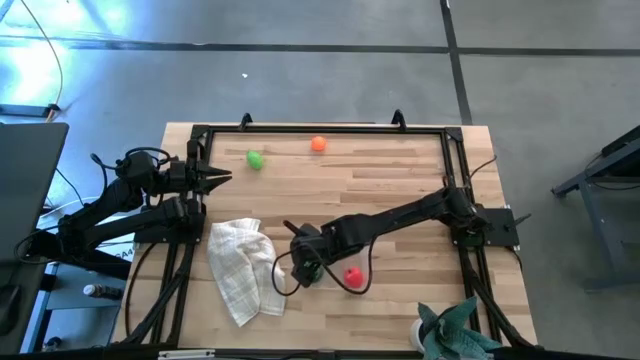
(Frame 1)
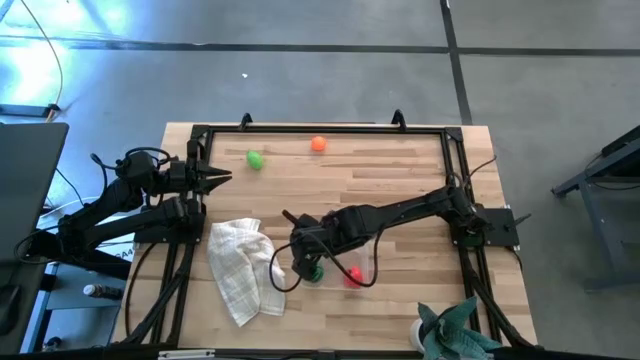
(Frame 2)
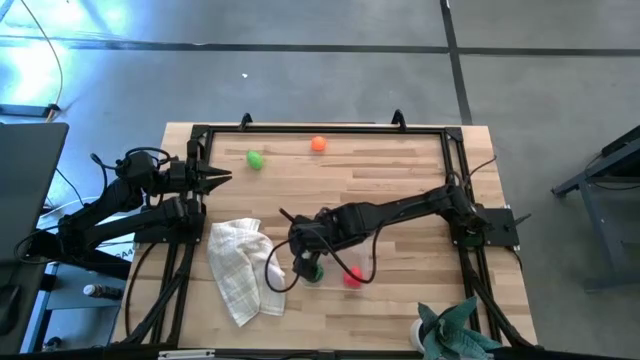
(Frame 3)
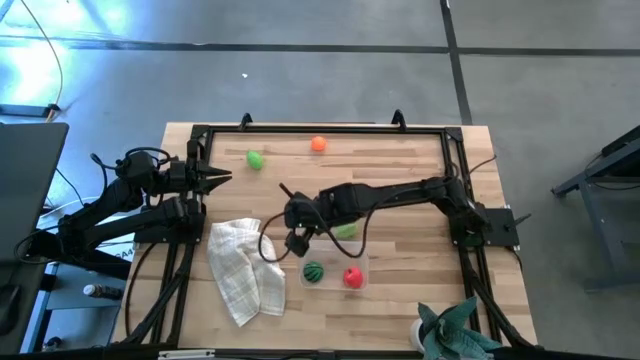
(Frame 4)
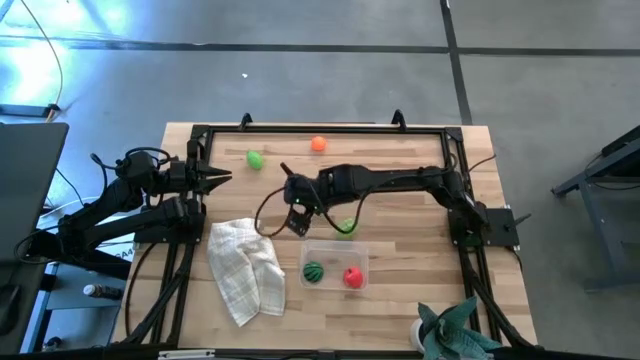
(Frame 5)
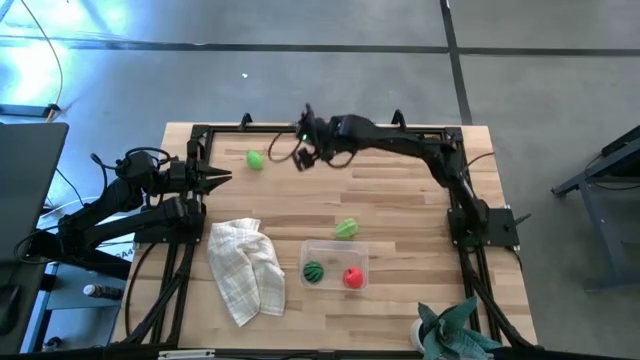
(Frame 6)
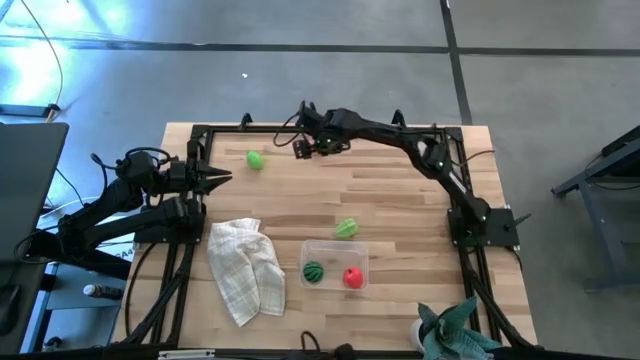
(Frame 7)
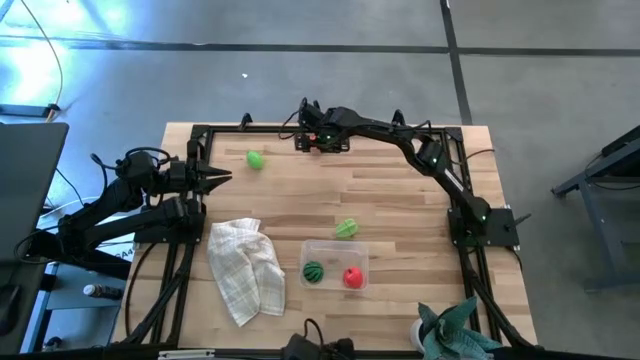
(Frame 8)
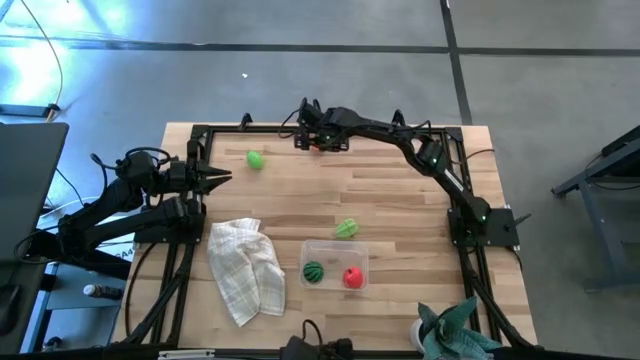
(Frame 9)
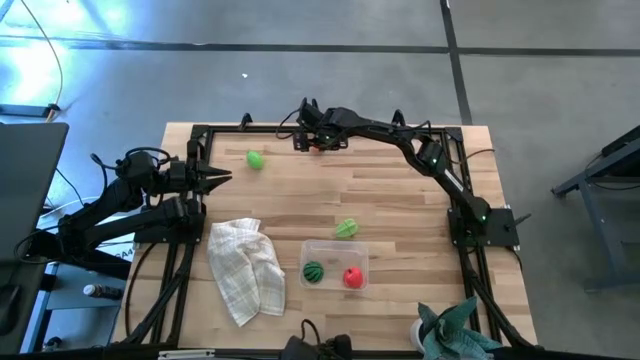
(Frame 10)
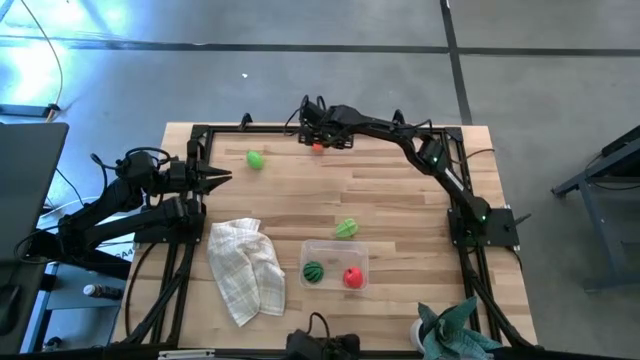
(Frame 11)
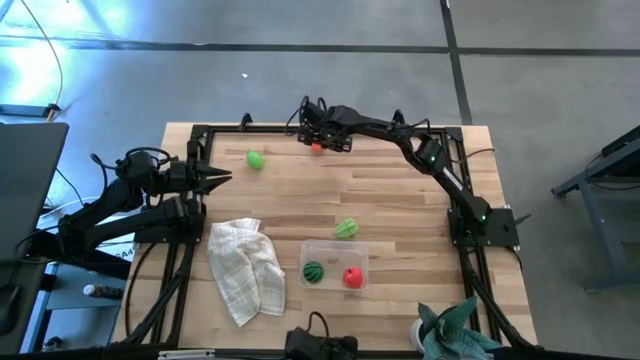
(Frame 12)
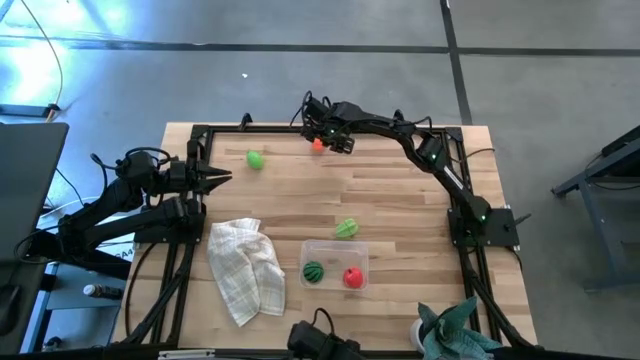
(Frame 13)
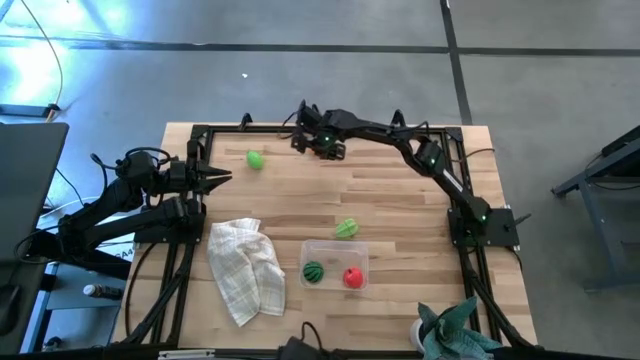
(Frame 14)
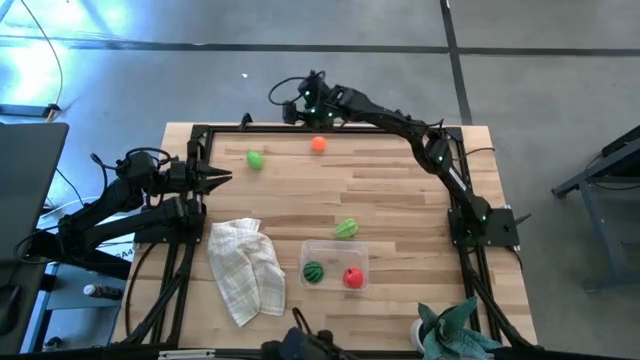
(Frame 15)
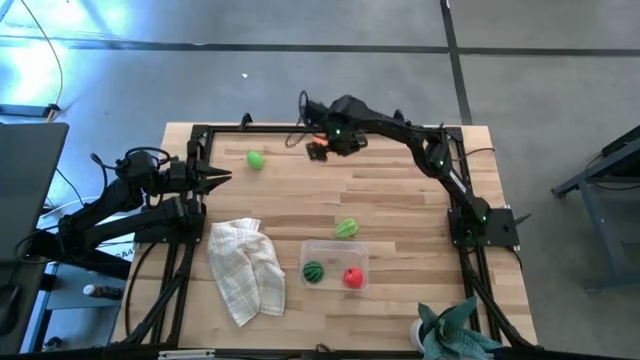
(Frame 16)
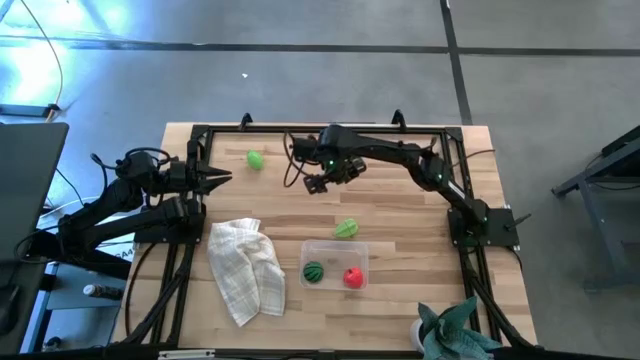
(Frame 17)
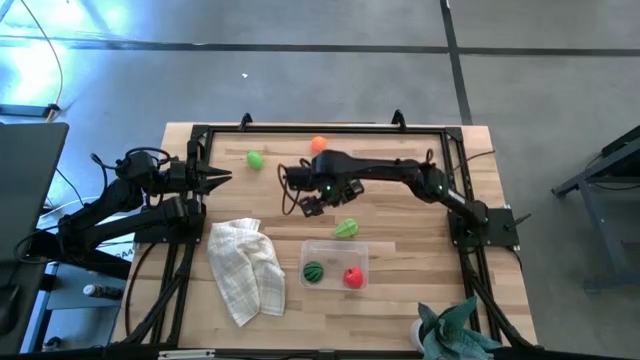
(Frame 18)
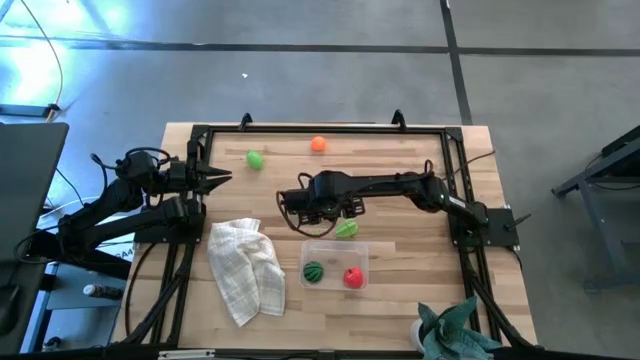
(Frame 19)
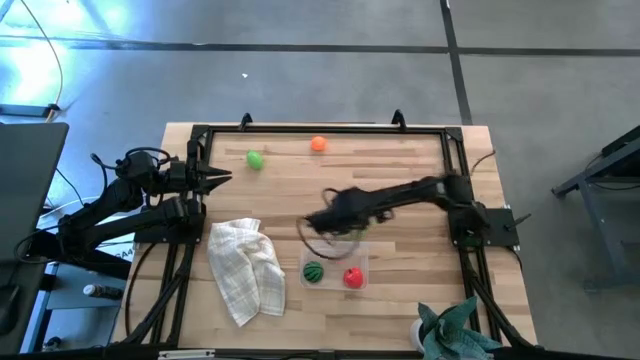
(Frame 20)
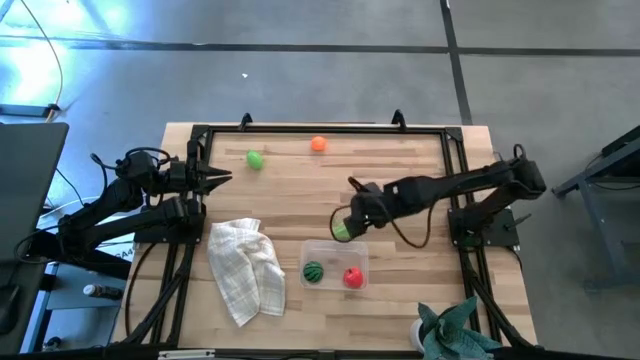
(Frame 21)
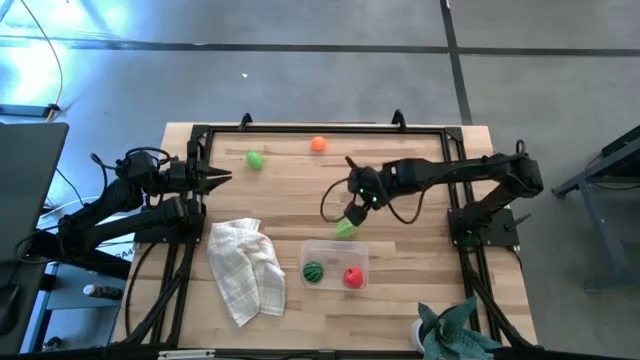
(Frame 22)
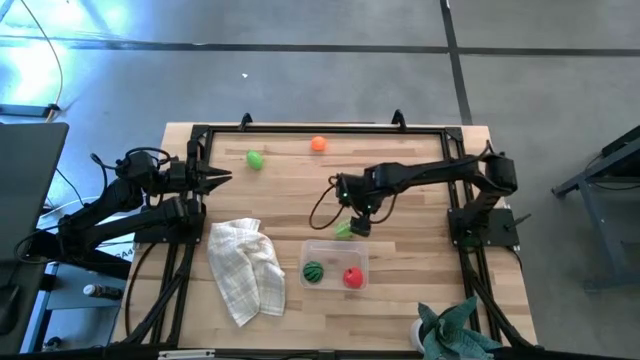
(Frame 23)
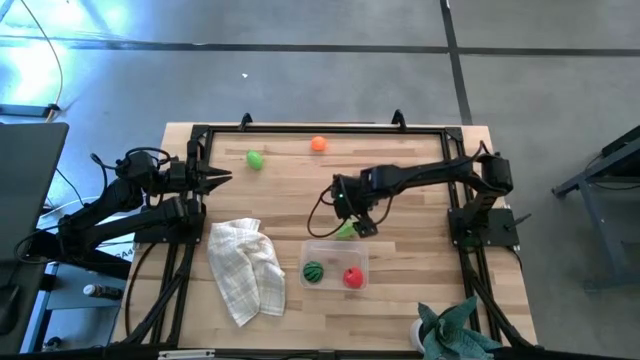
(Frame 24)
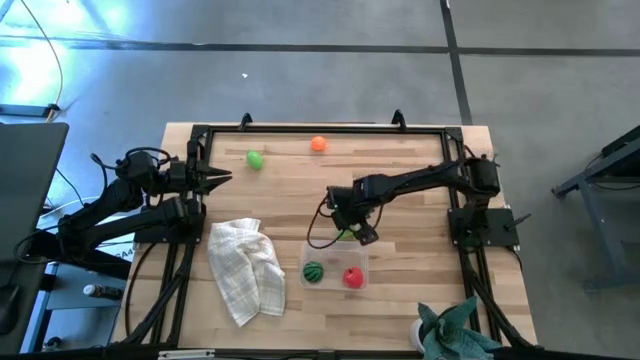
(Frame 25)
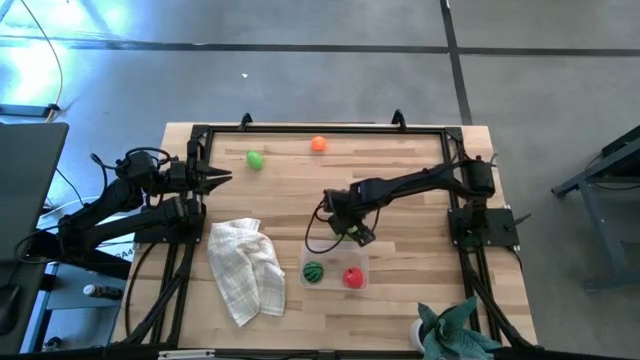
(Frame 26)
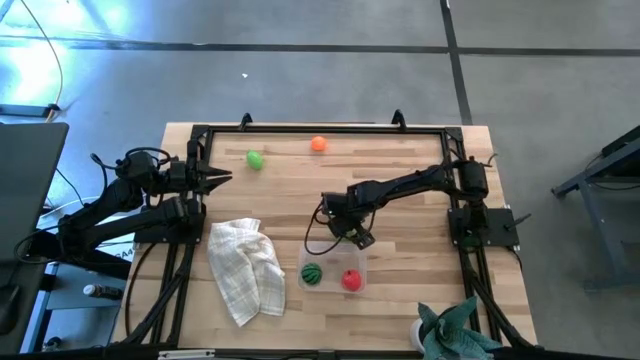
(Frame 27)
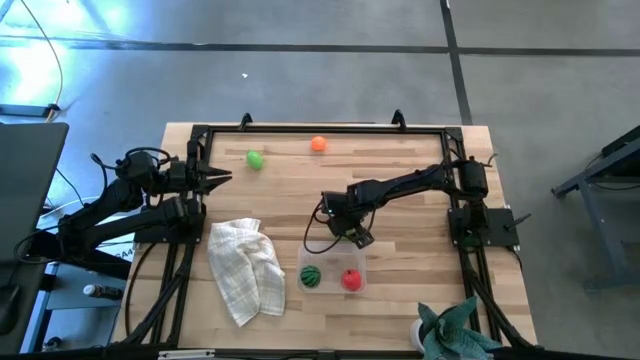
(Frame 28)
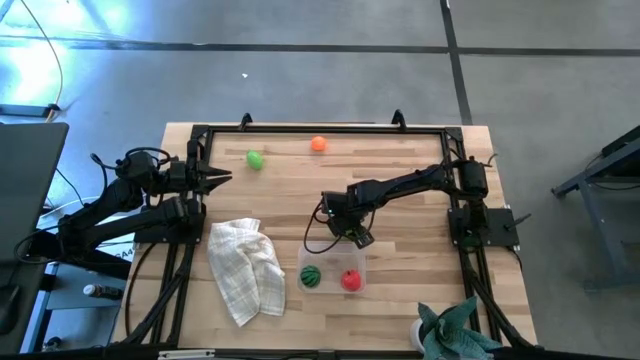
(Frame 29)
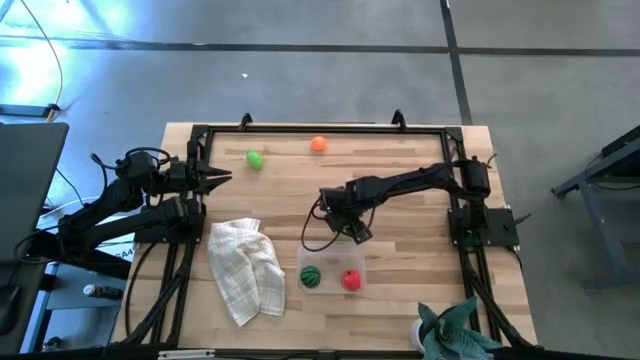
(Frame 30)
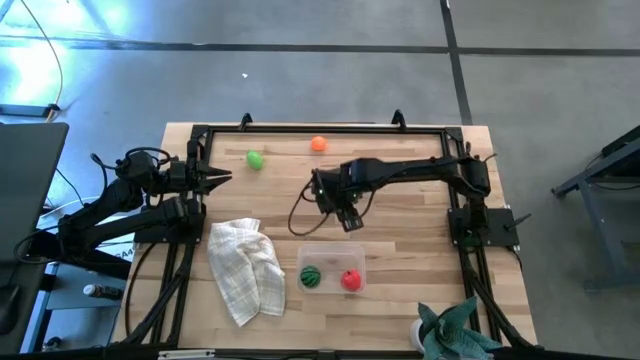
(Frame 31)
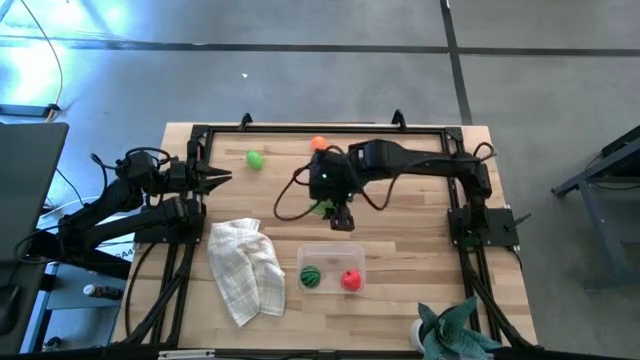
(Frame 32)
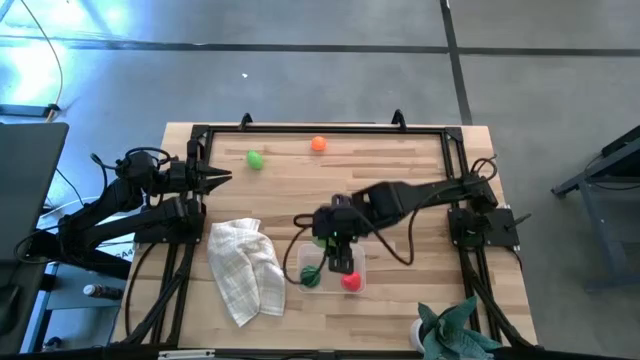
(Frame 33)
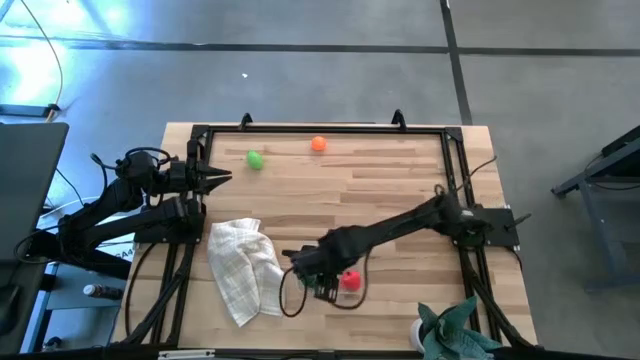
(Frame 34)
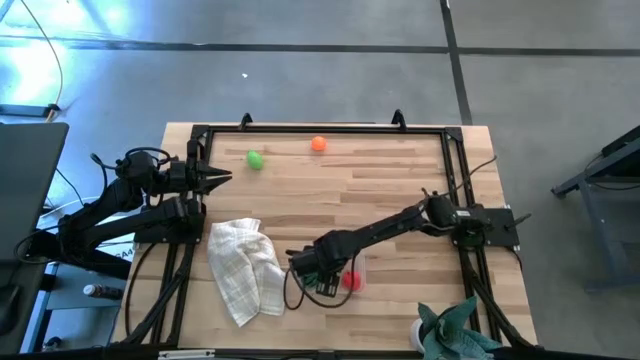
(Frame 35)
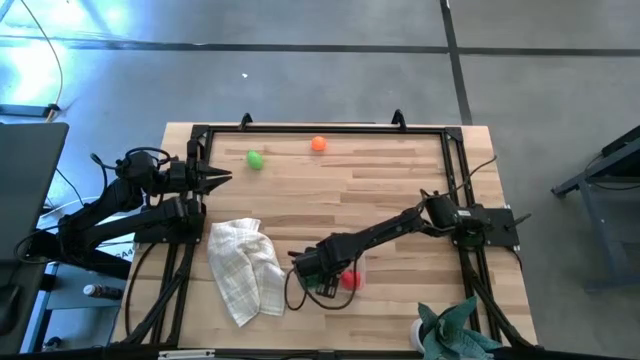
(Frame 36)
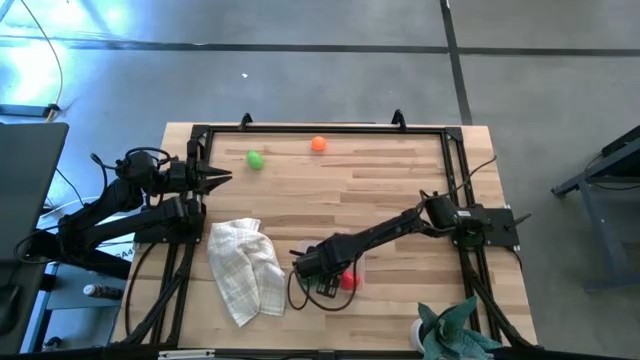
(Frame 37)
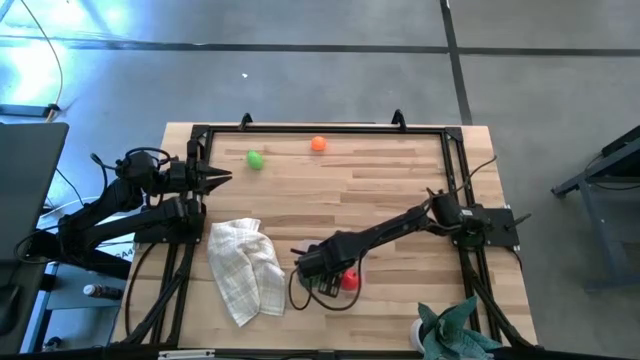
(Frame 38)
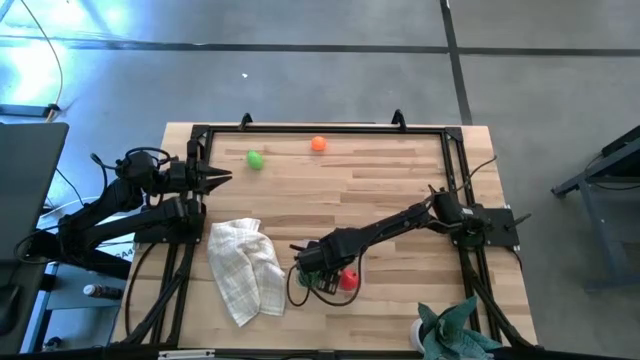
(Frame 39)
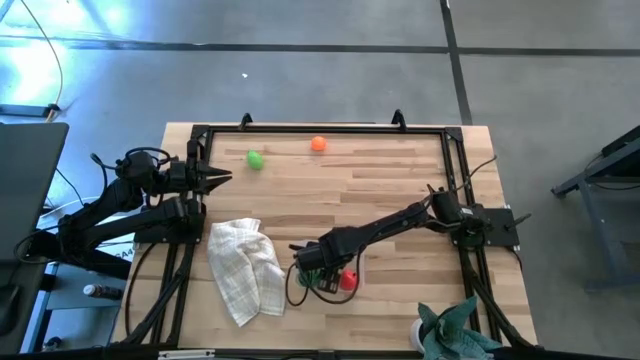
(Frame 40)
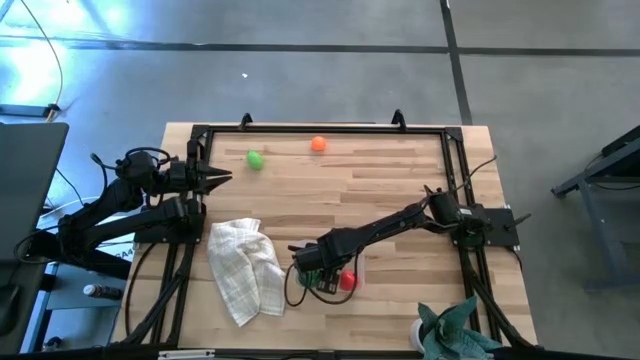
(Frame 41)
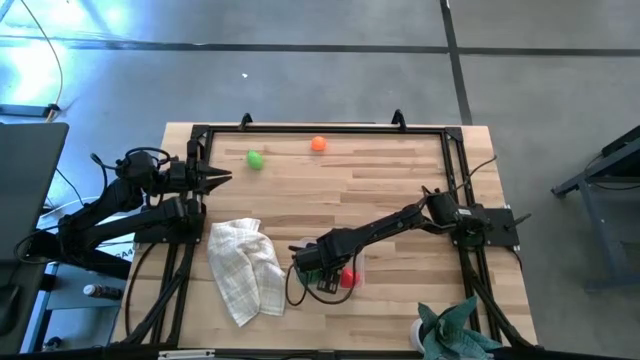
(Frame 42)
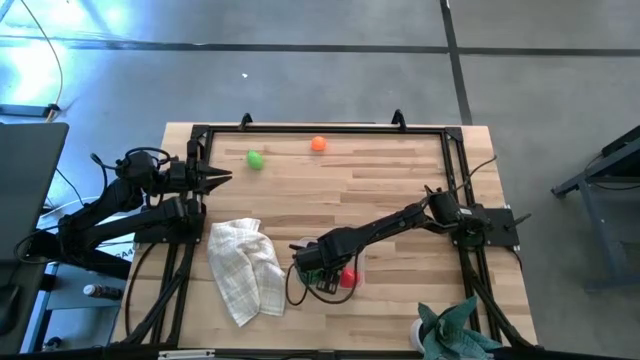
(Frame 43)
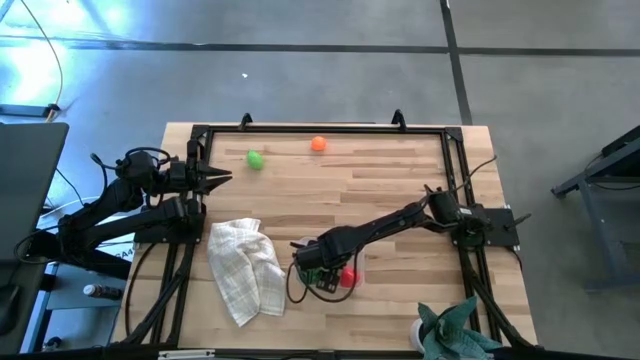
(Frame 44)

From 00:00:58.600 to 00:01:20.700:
Task: Pick and placing Produce into tupperware
Put the green starfruit into the transparent bin
